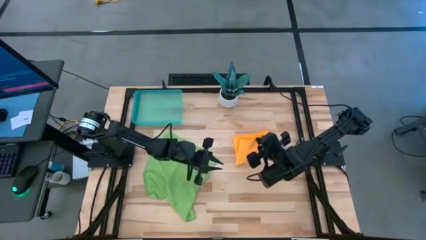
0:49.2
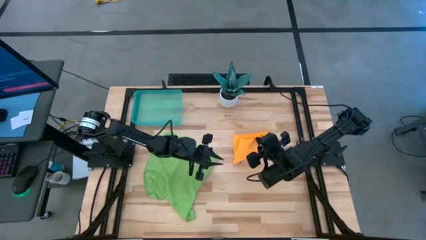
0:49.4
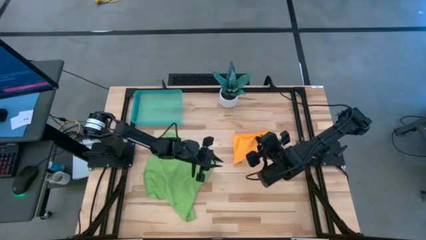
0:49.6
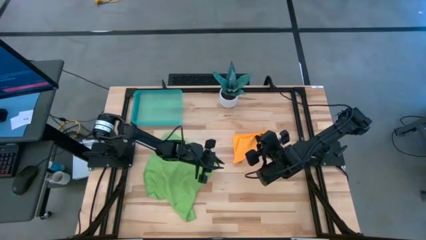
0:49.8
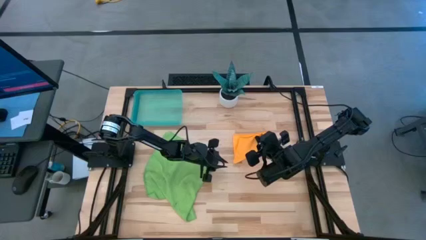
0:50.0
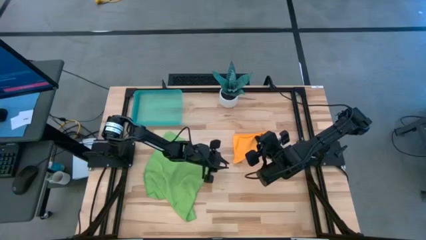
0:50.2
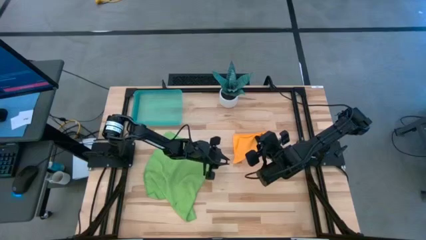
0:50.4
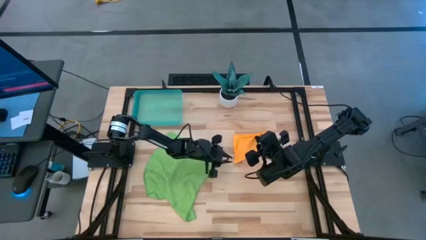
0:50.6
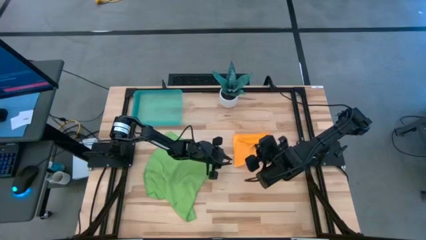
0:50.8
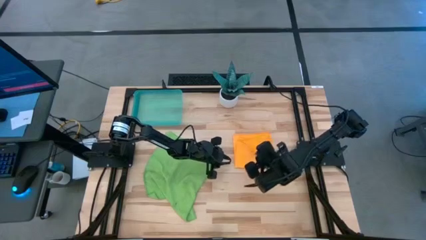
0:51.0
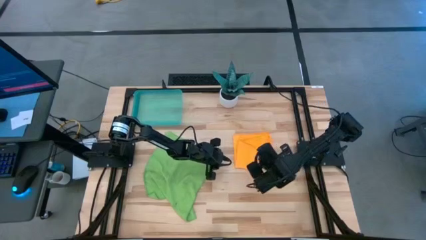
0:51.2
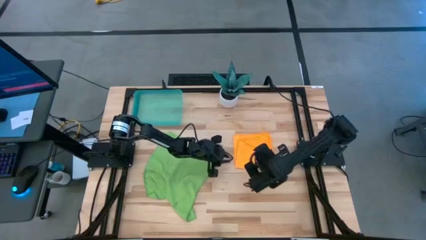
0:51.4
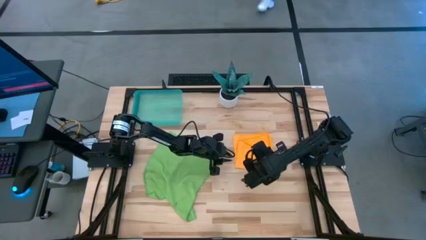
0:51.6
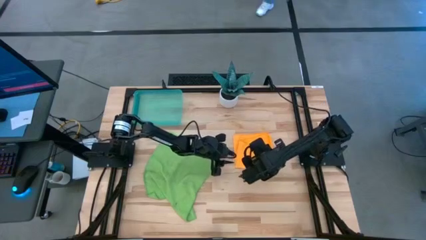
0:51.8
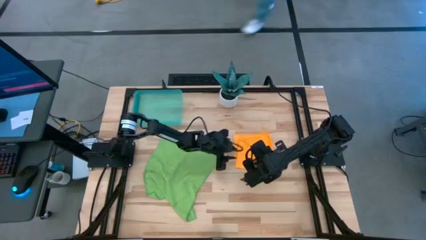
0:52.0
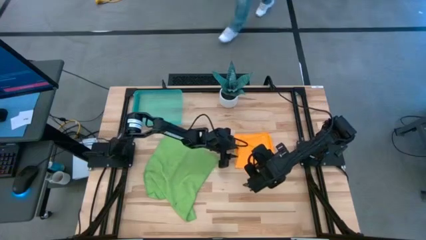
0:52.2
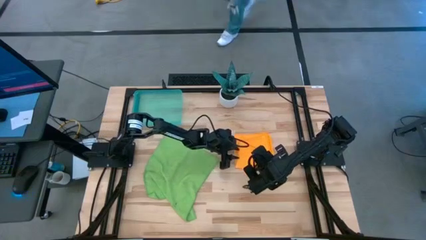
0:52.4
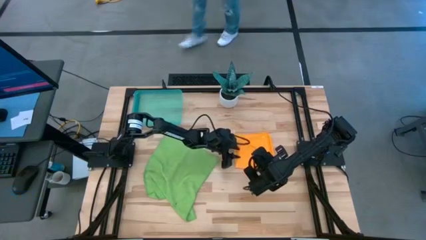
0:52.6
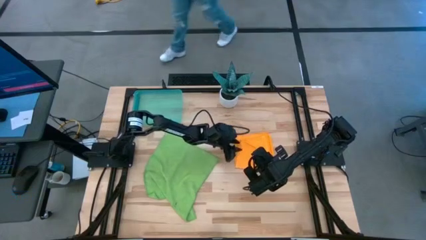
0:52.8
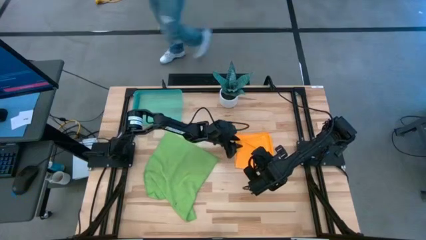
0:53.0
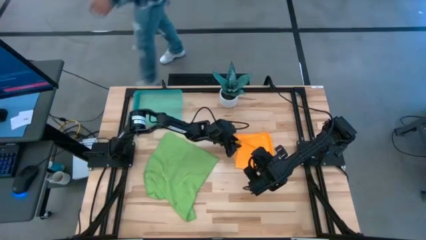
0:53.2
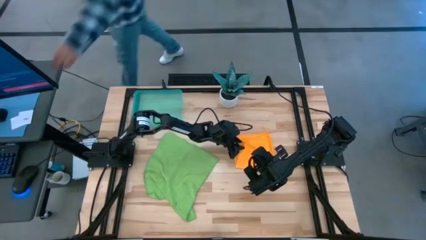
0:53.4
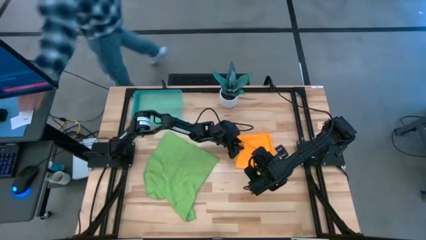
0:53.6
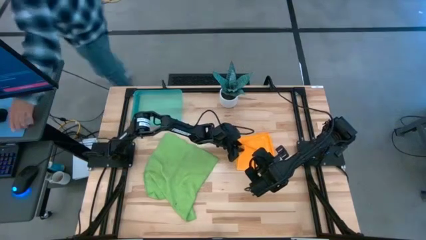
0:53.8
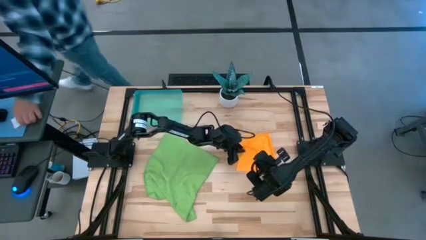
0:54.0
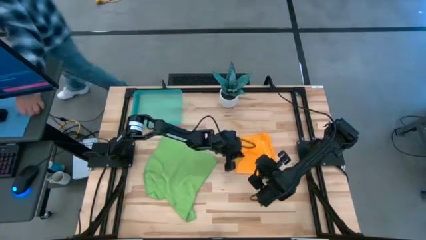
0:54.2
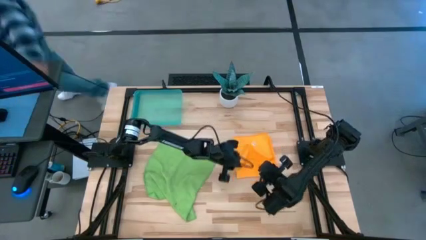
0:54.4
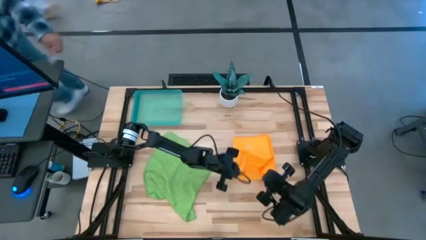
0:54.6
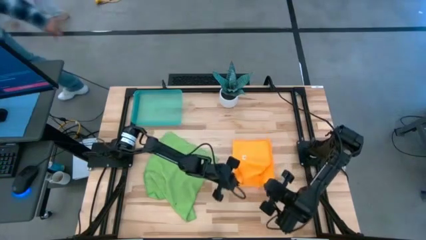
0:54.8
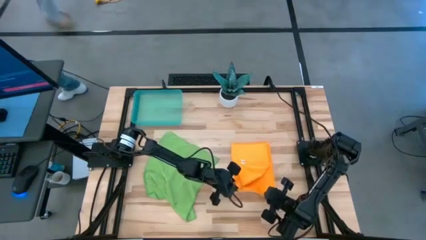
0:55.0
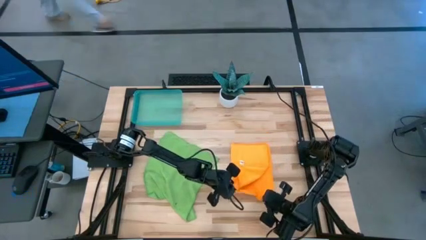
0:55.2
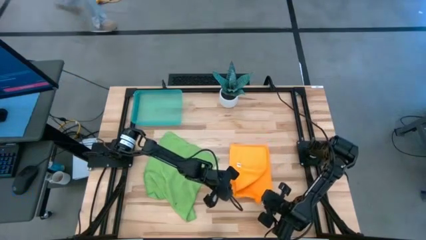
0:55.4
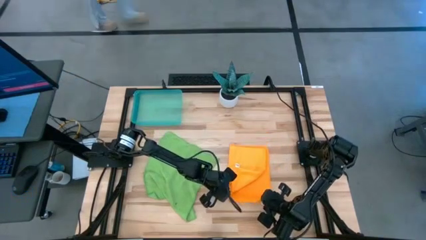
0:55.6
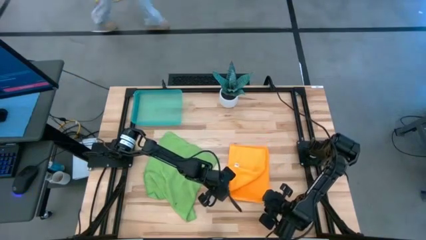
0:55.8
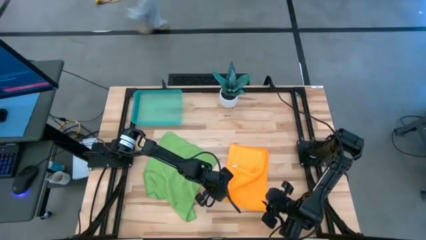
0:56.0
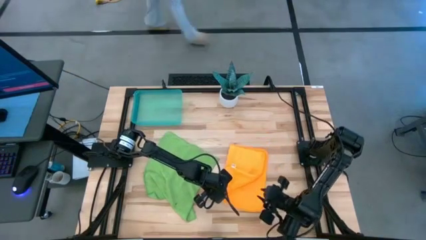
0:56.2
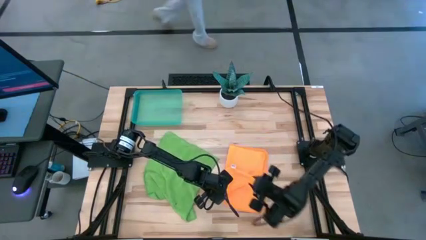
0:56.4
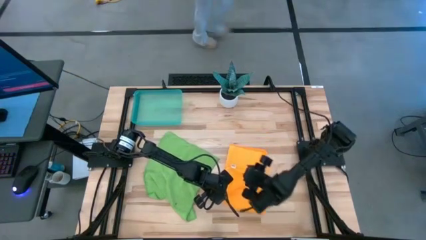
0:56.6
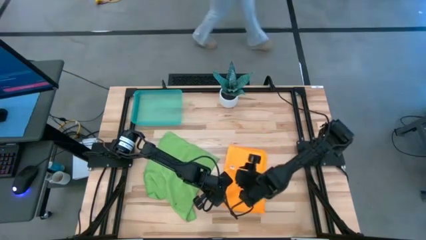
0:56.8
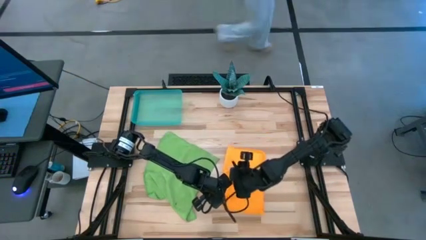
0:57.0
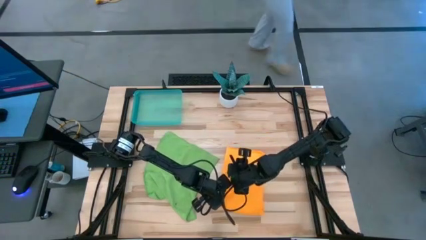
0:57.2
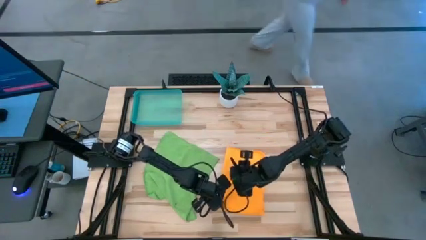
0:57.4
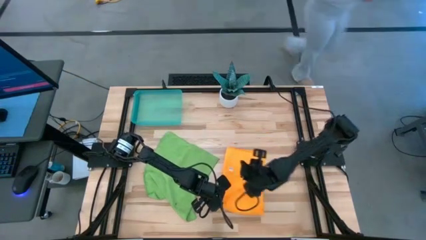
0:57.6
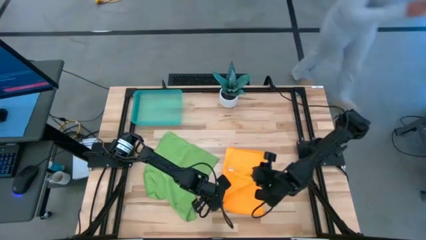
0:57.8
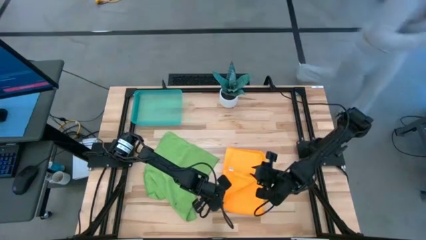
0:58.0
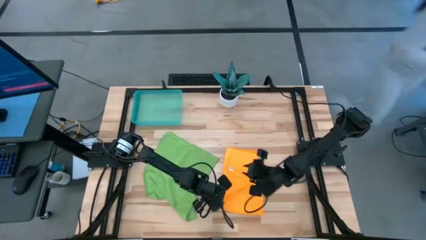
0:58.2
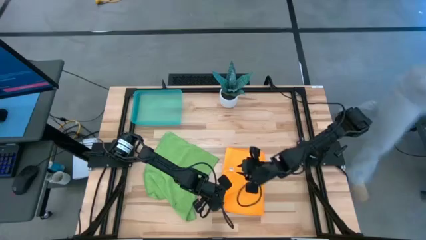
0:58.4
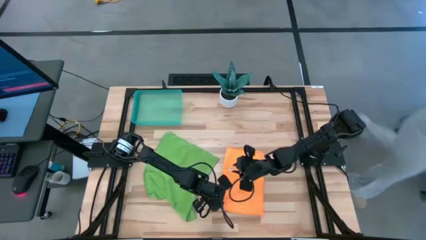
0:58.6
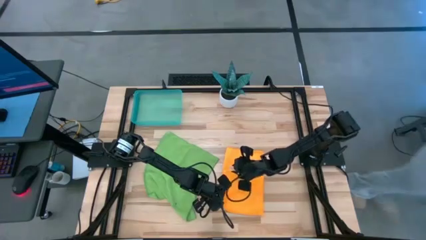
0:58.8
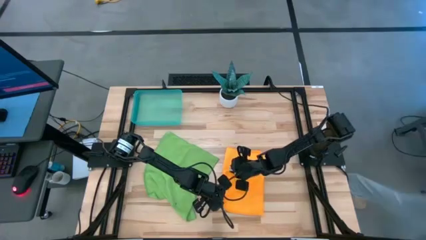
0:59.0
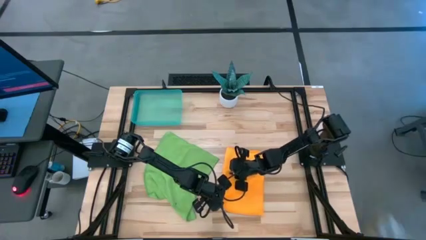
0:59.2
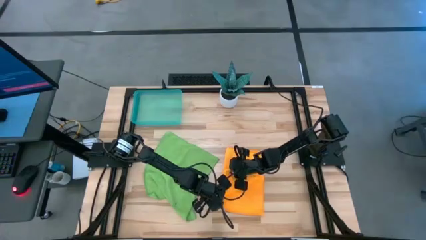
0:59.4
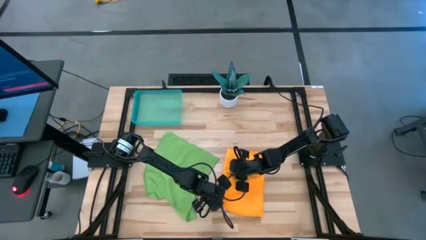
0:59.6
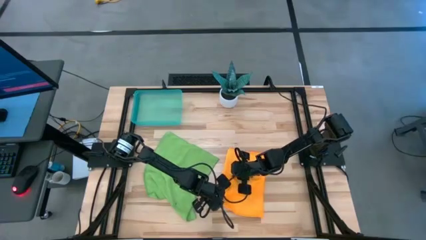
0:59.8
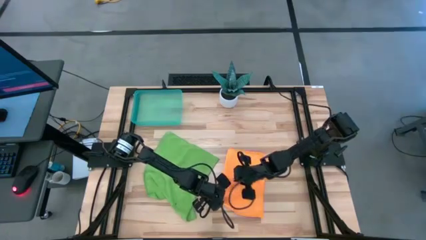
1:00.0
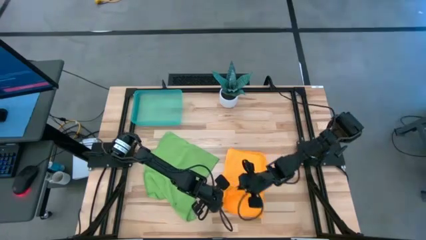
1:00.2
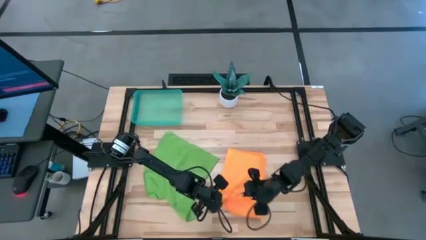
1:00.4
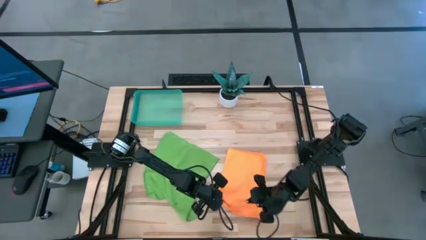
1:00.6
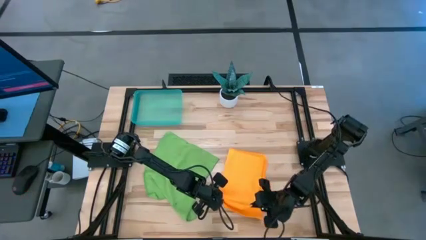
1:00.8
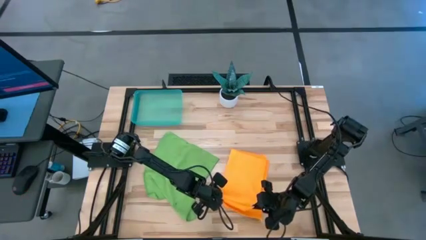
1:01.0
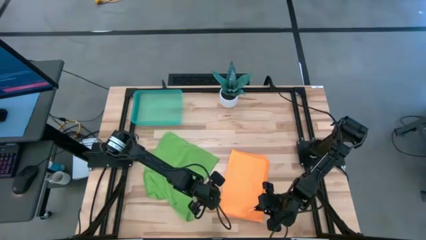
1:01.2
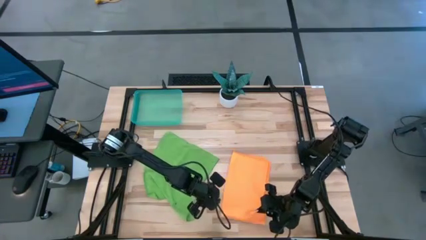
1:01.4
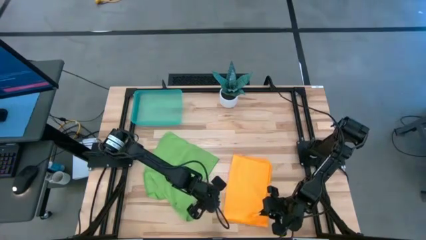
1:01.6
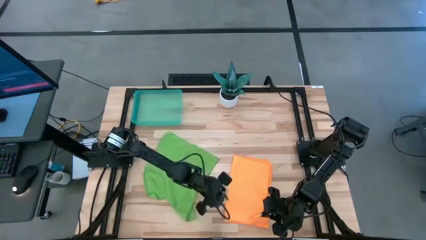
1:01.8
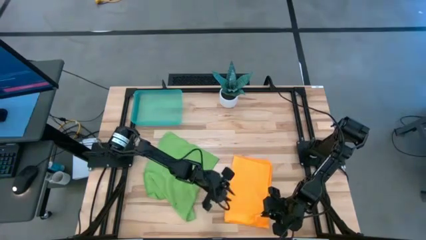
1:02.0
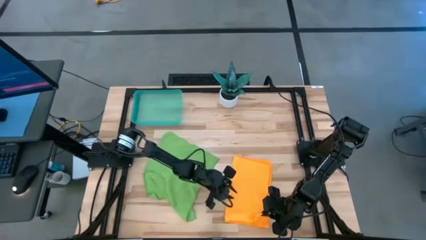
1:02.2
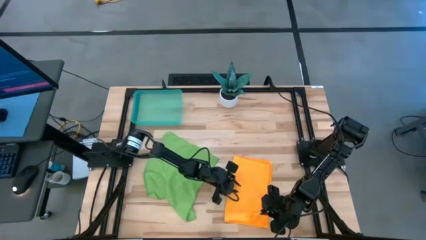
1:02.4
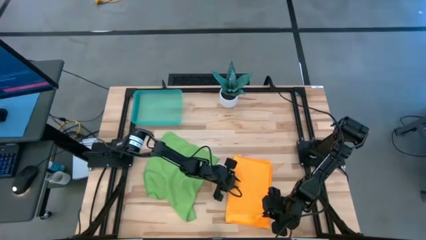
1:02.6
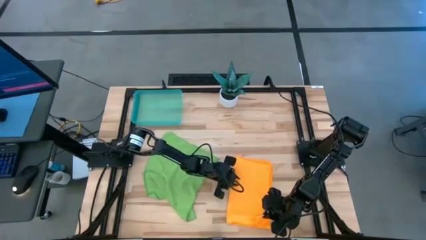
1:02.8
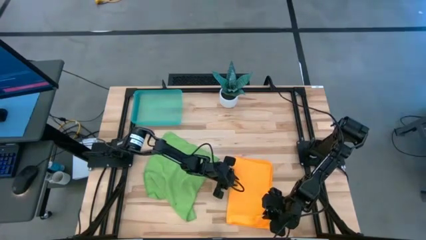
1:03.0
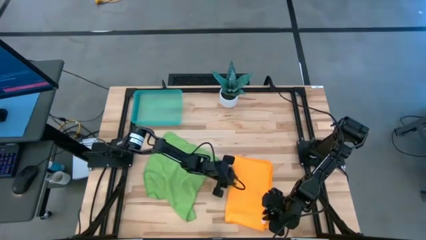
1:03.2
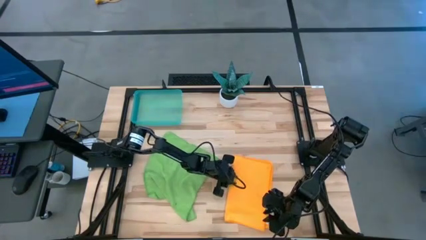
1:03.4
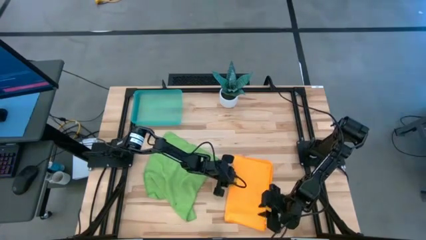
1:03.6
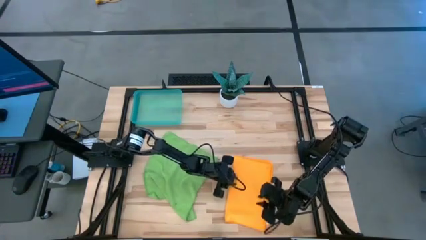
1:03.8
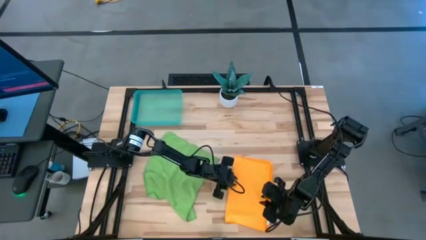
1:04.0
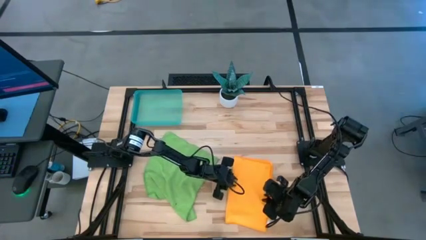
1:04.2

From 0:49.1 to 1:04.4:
Task: Roll microfiber towels into tight, uniform cylinder then place into a basket
Fold the yellow microfiber cloth

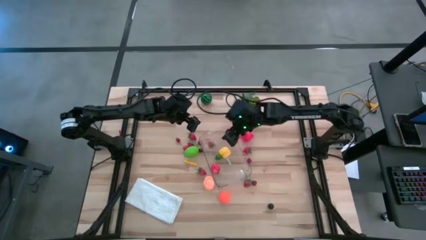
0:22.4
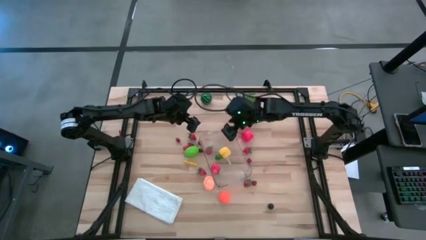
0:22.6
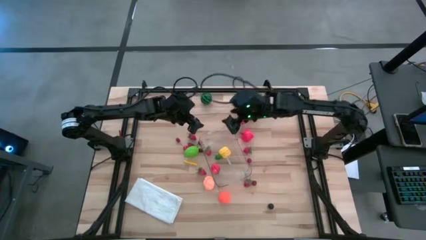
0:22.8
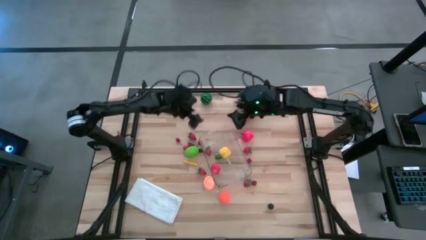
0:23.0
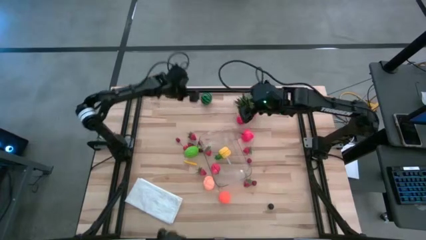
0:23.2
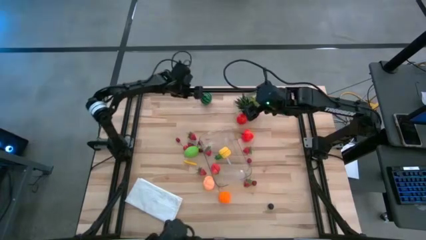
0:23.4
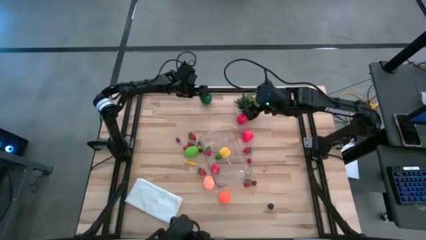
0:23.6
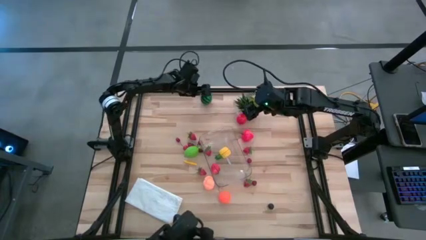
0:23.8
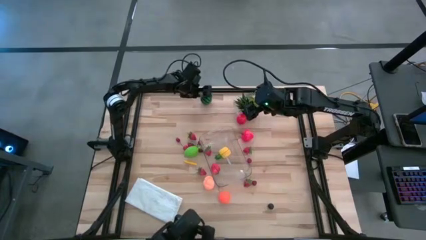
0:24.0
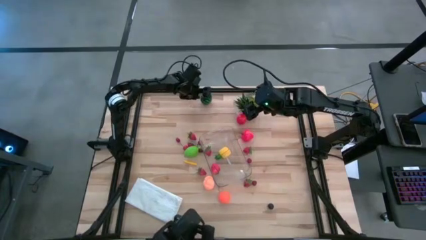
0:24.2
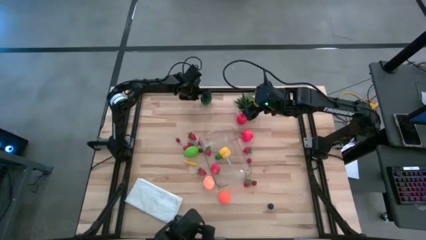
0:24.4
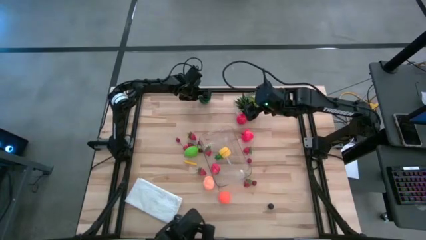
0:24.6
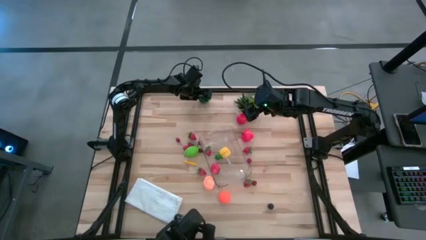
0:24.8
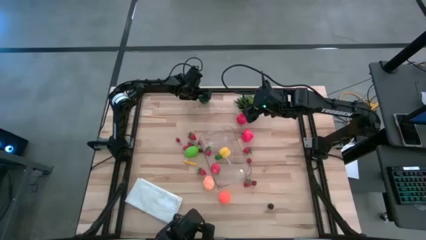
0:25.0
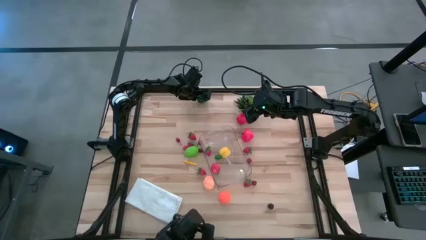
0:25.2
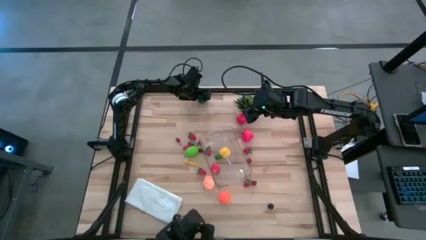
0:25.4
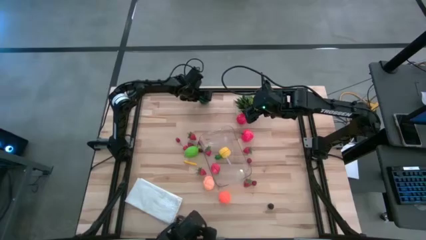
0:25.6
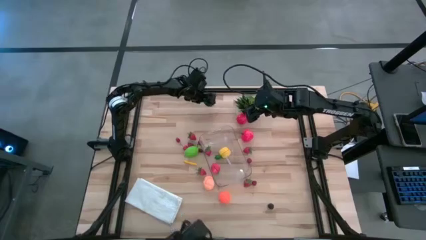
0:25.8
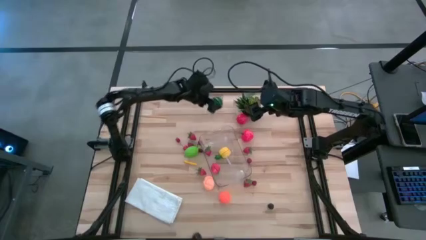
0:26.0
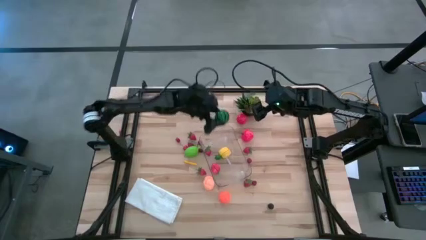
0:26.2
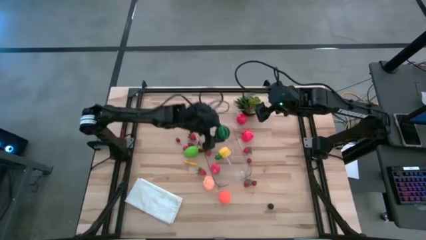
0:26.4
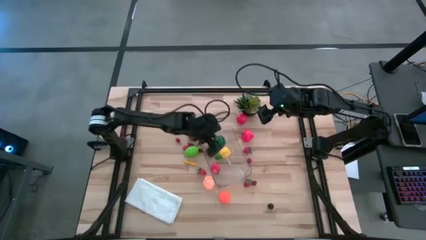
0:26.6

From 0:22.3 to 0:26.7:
Task: Pick and placing Produce into tupperware
Put the green watermelon into the transparent bin
